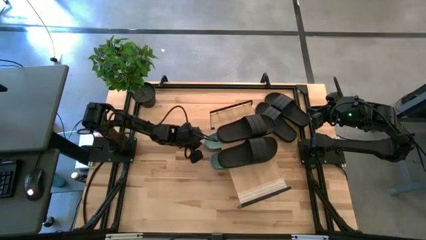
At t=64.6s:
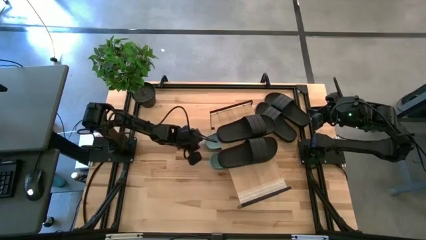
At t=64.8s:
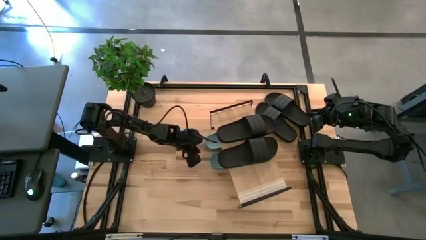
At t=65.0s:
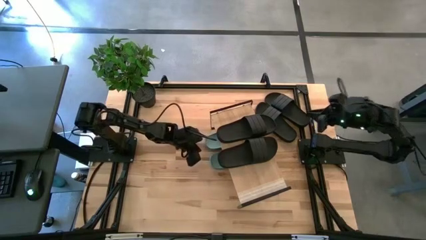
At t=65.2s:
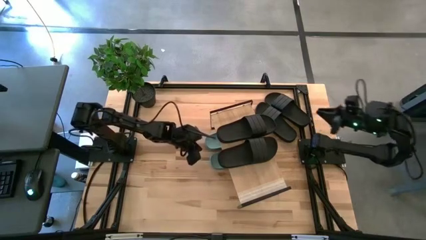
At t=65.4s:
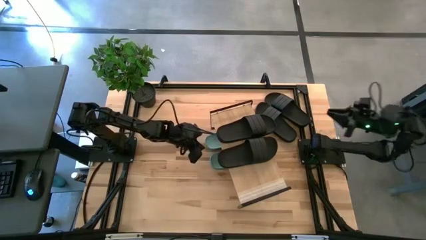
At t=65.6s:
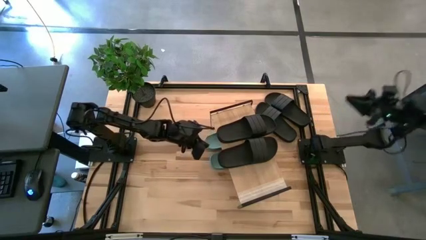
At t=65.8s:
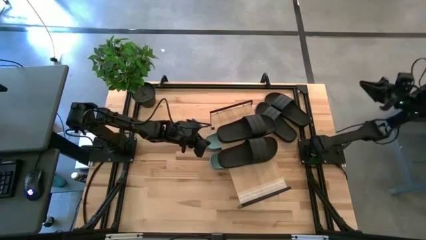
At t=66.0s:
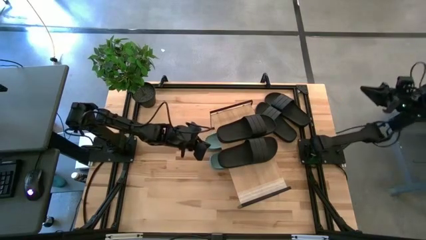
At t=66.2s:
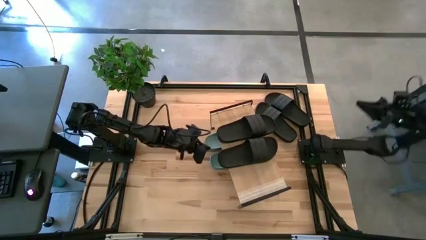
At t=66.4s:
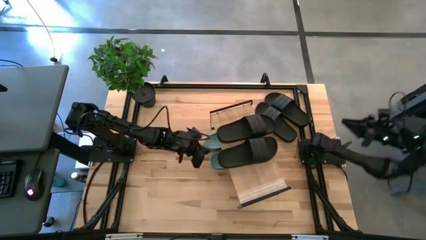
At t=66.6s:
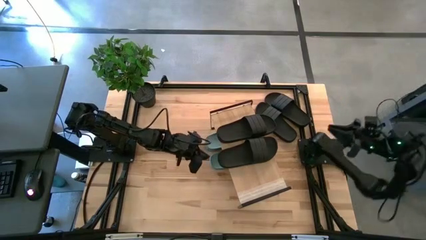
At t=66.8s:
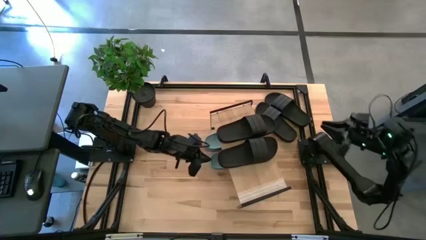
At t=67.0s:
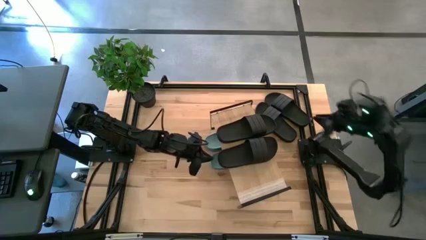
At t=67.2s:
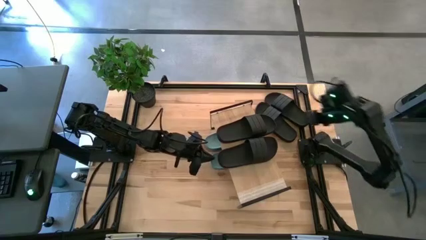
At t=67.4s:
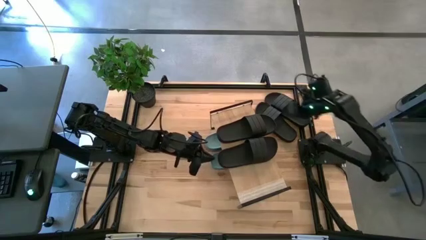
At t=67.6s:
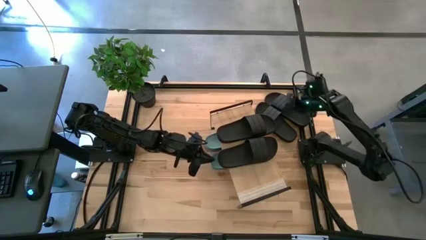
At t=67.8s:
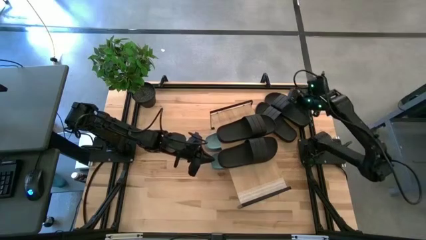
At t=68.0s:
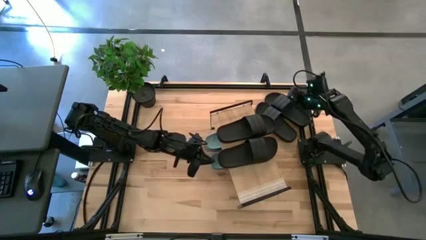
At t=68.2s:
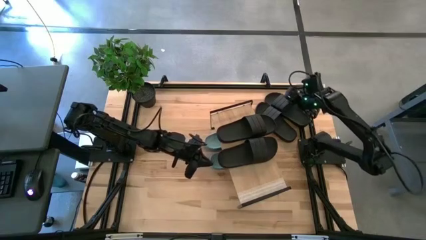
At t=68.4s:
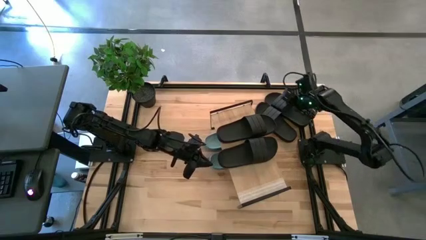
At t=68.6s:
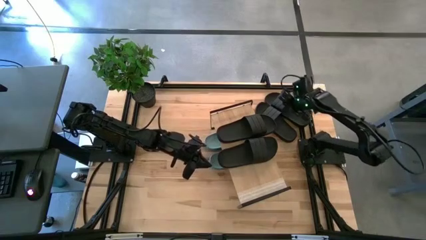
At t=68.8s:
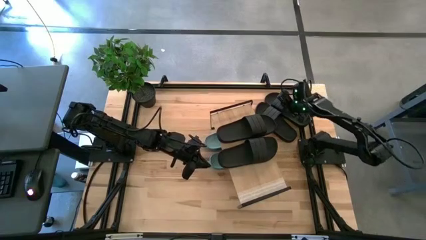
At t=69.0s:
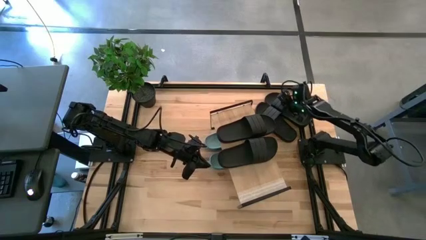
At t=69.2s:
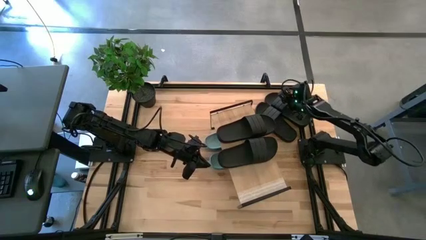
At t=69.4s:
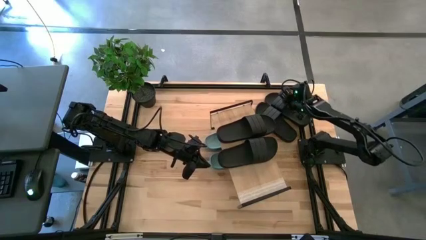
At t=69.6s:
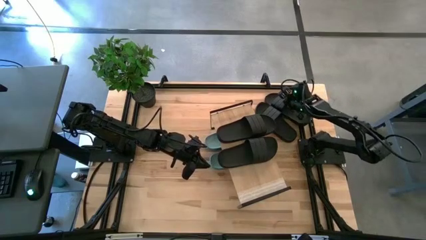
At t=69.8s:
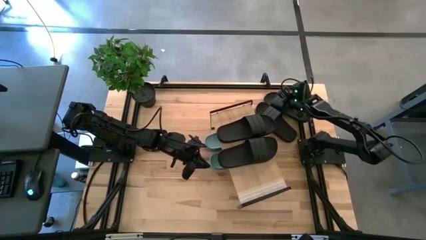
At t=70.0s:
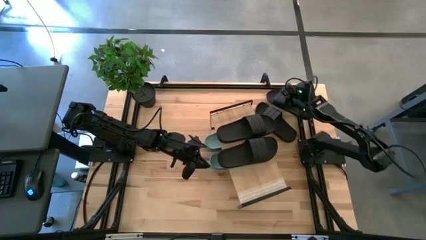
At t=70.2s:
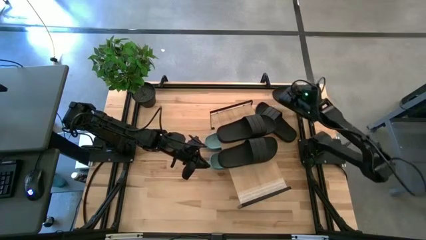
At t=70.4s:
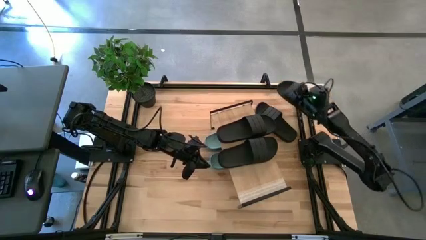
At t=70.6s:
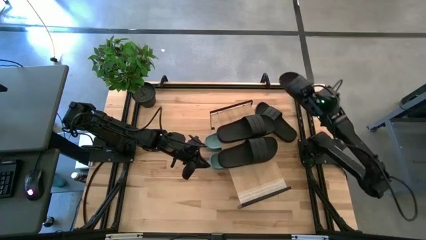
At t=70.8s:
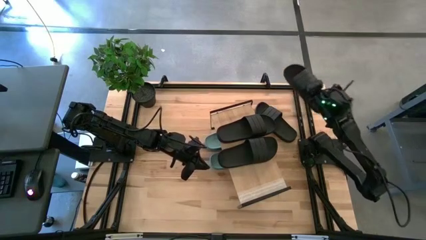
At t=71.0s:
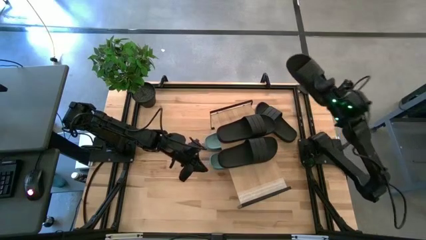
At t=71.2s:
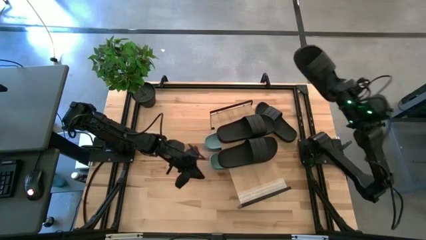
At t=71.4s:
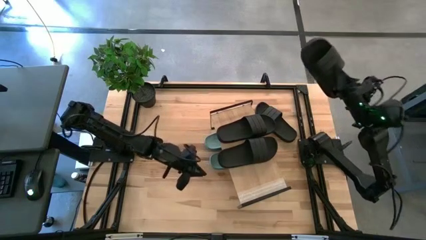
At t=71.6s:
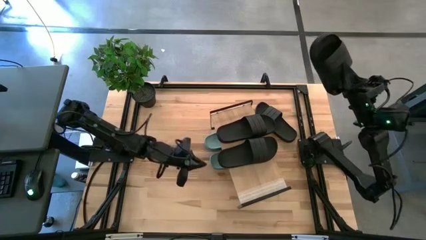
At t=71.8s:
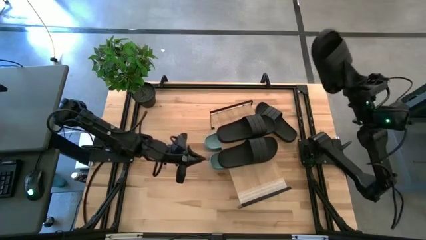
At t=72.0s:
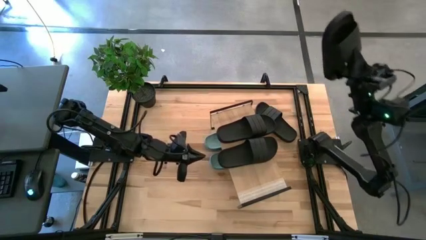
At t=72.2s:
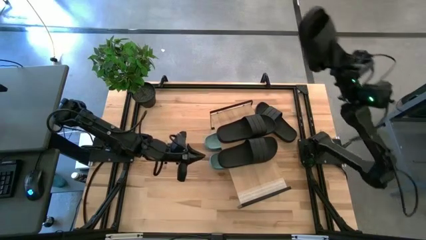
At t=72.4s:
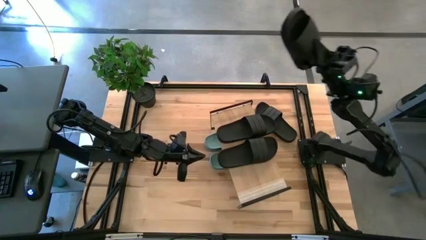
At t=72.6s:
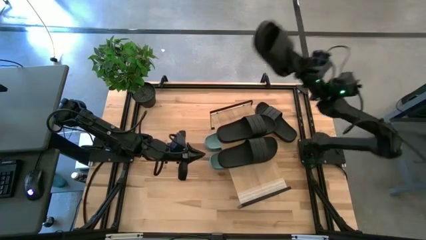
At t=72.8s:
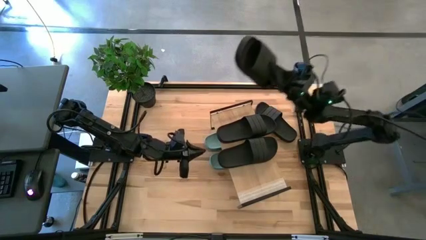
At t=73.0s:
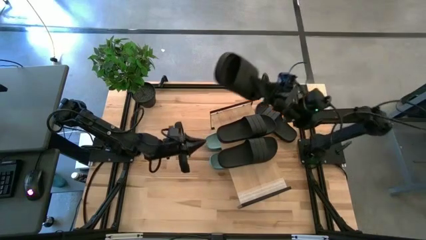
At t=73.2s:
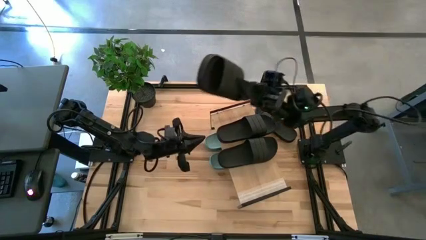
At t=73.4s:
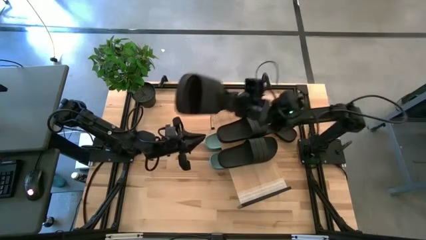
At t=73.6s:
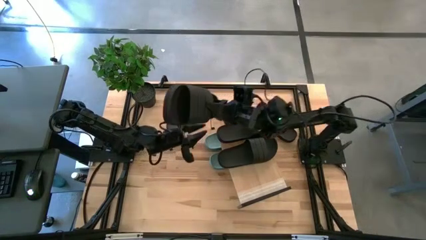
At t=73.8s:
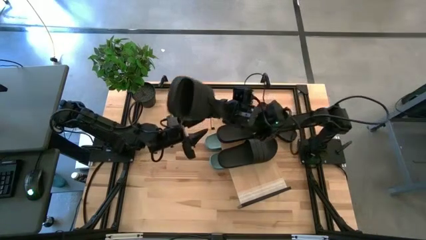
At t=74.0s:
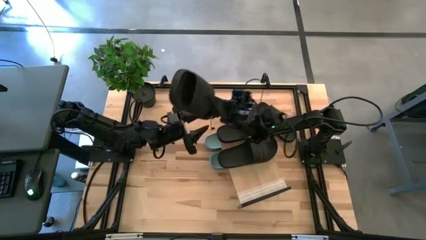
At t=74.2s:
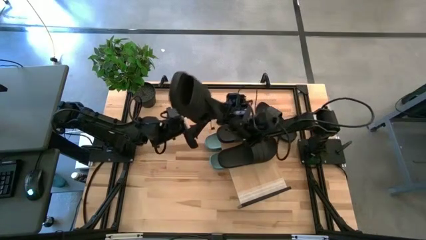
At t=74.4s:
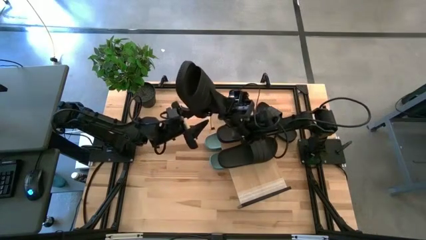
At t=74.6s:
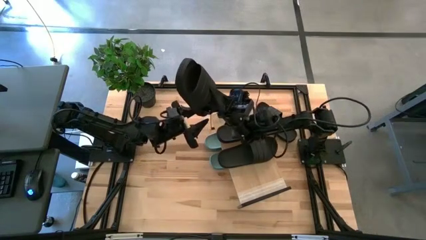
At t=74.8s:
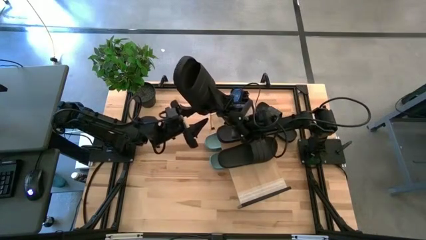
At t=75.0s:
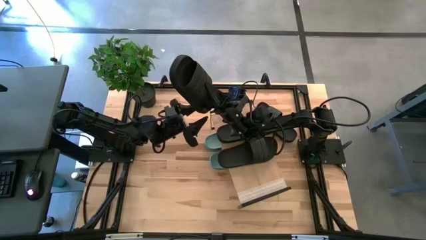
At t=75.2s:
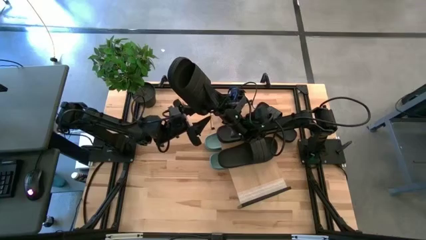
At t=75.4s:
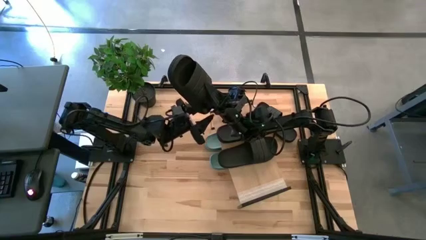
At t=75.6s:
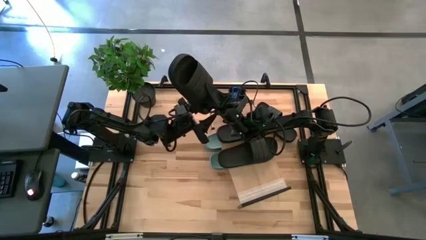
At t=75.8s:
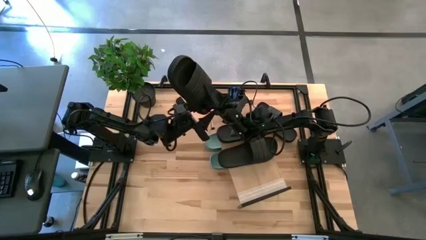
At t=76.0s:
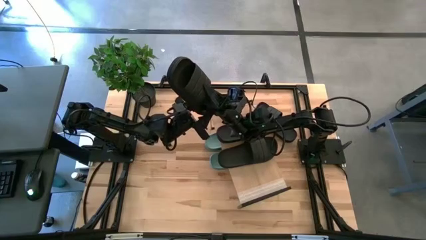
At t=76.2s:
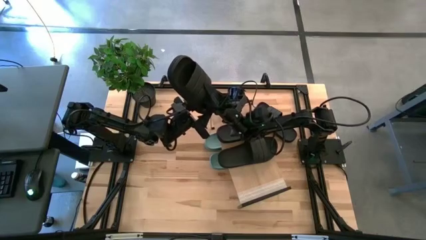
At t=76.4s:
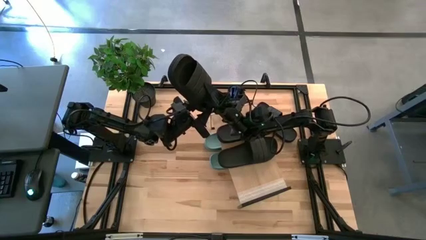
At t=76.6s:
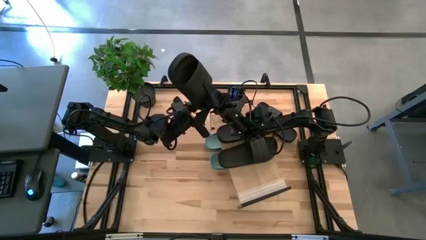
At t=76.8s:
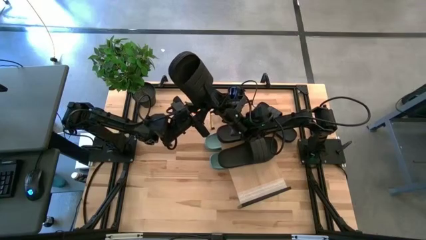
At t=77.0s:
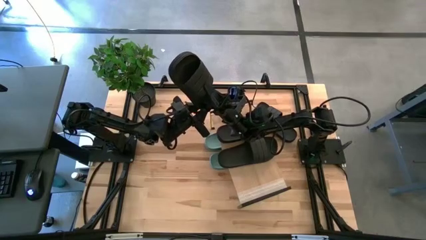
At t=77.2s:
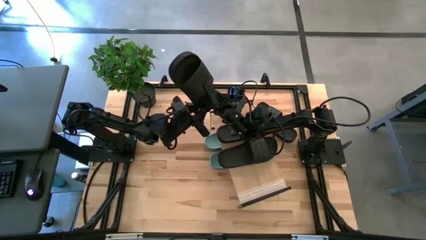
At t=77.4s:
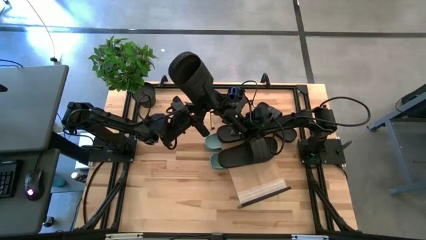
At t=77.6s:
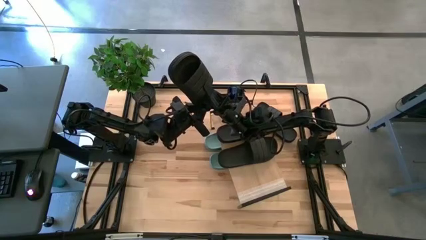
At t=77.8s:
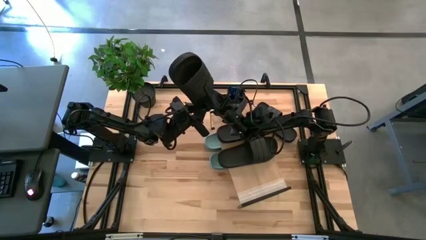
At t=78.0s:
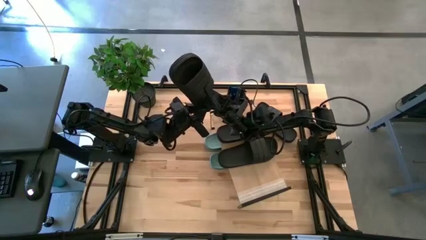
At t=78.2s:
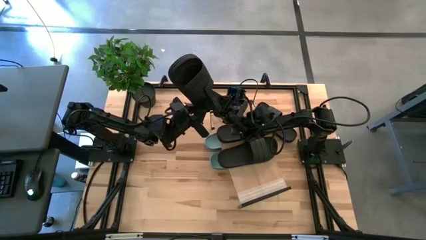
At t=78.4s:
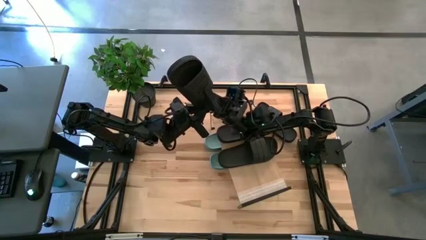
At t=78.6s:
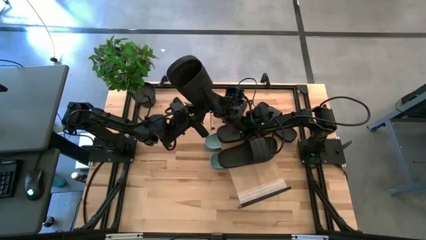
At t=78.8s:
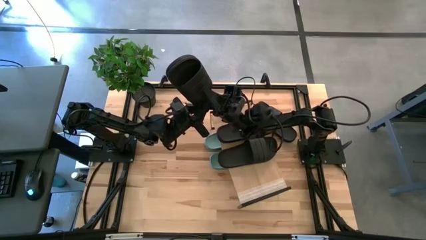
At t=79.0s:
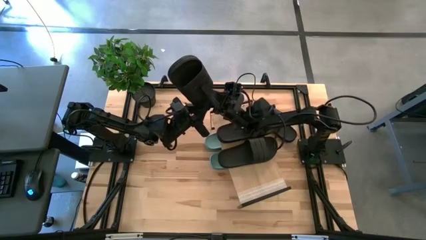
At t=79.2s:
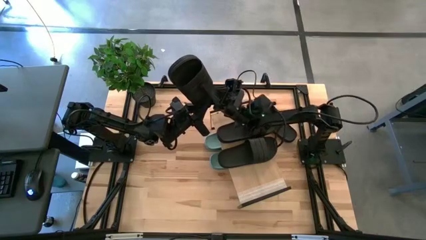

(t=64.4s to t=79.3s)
Task: Pick and place slides into the shelf
Put the black slides under the shelf
